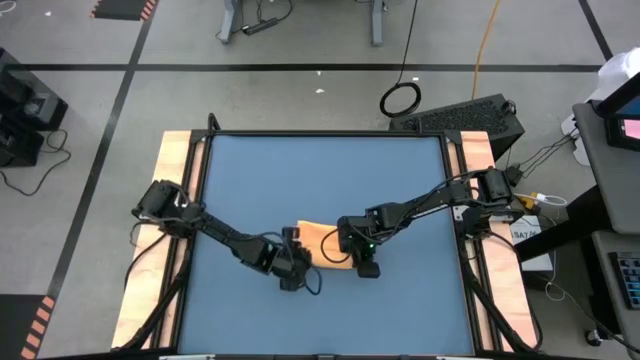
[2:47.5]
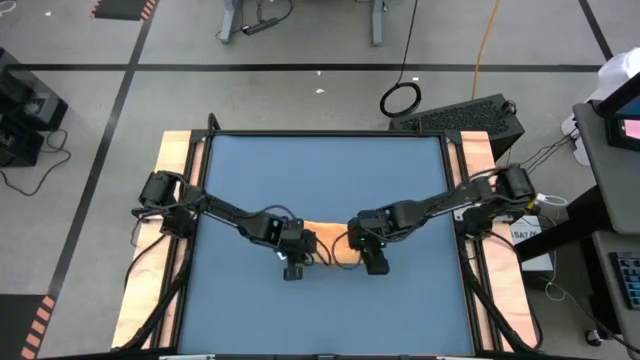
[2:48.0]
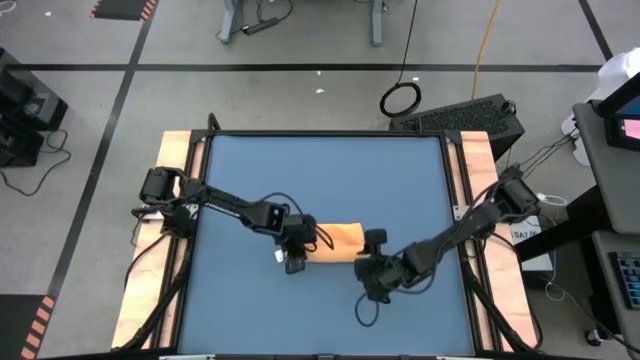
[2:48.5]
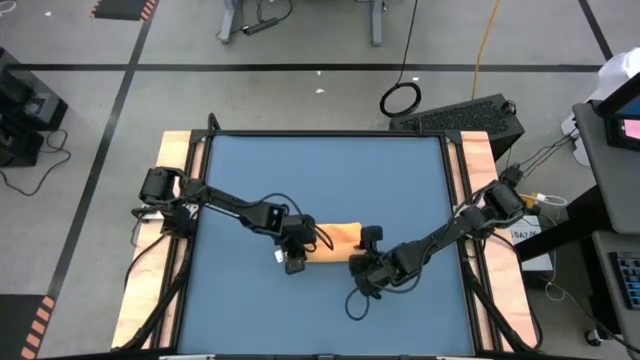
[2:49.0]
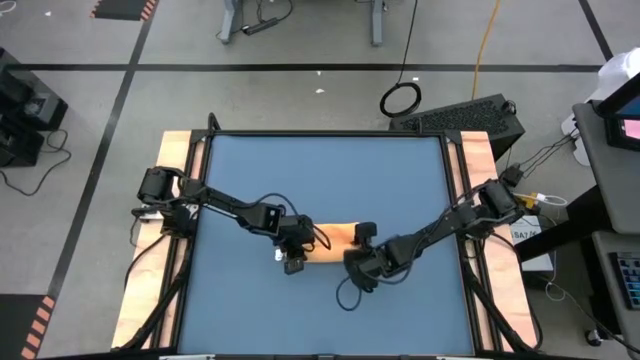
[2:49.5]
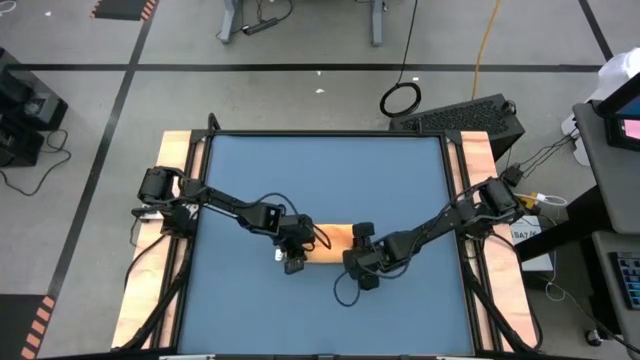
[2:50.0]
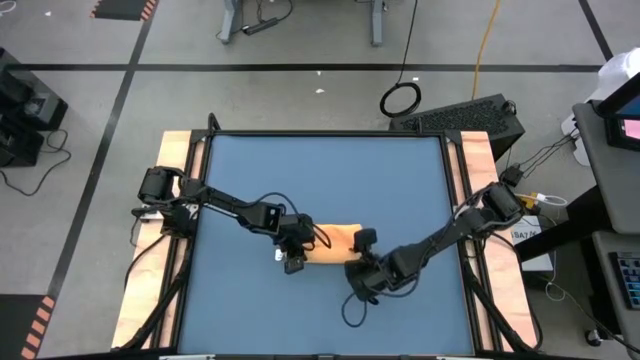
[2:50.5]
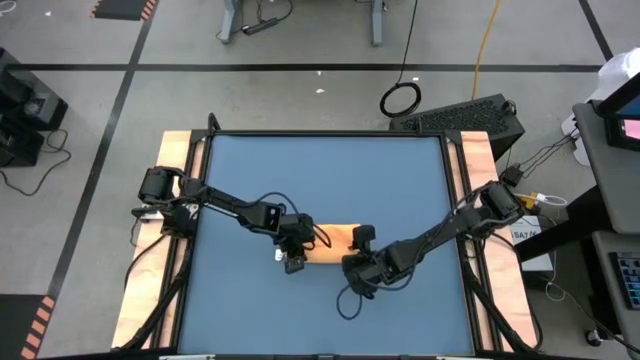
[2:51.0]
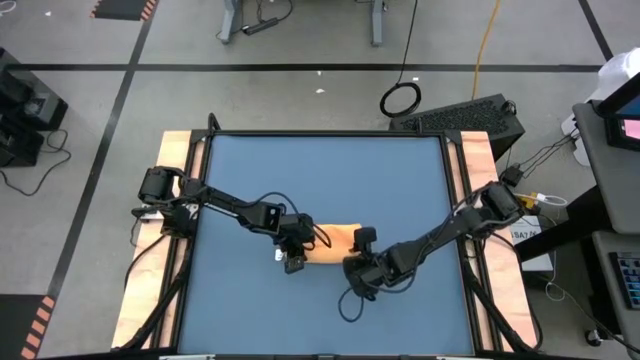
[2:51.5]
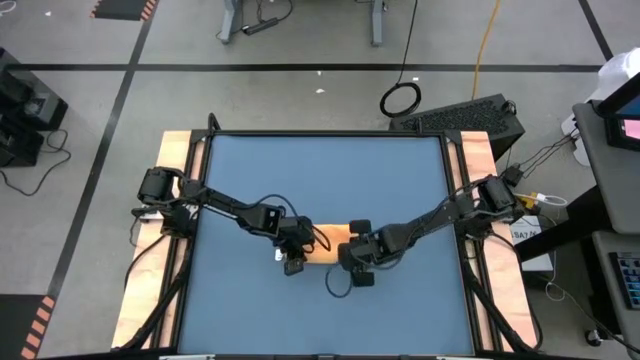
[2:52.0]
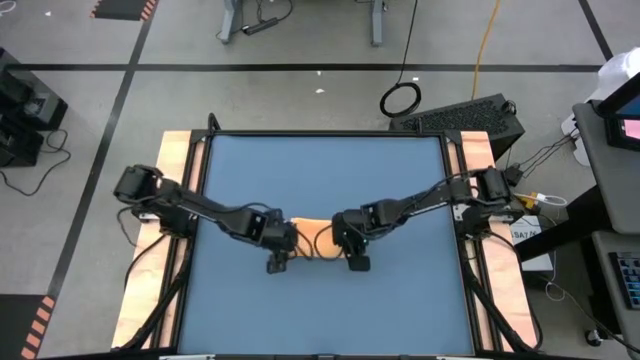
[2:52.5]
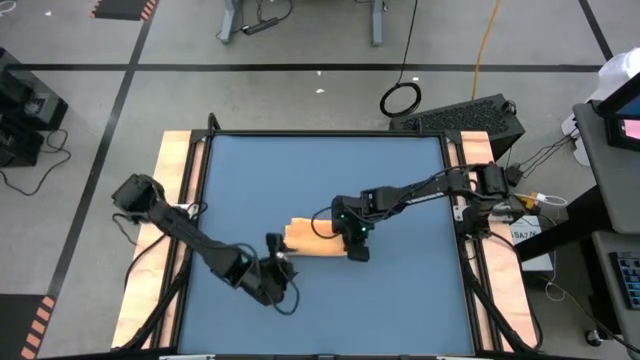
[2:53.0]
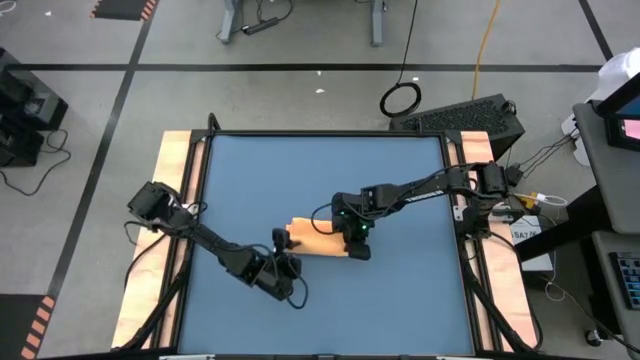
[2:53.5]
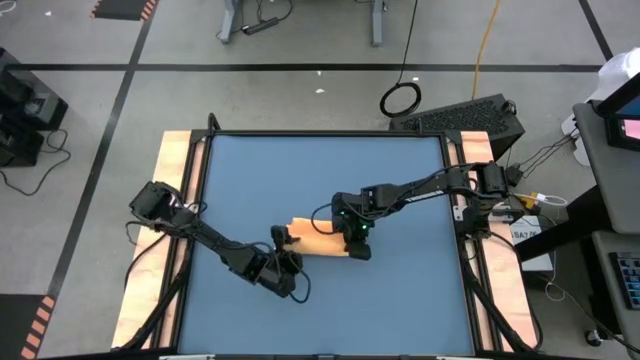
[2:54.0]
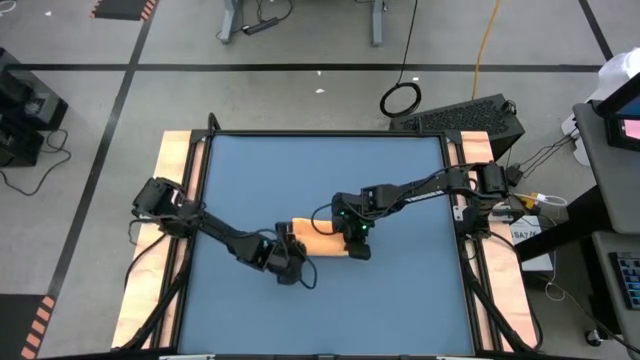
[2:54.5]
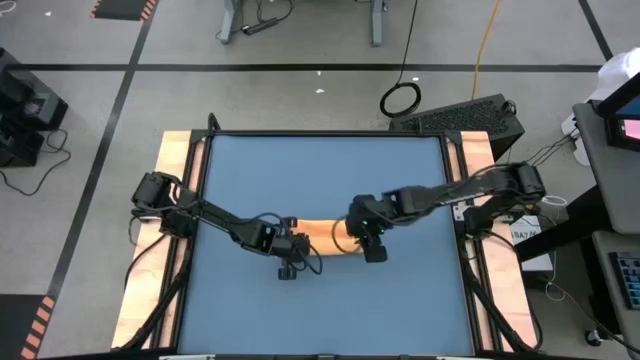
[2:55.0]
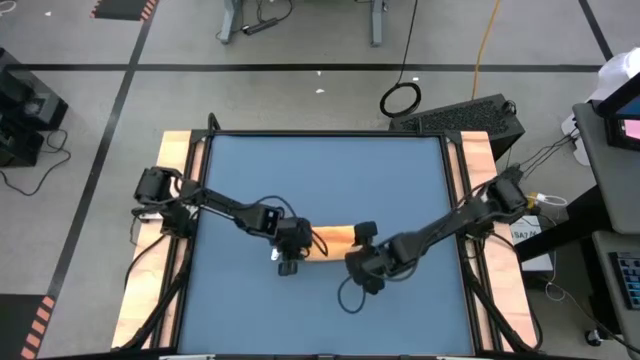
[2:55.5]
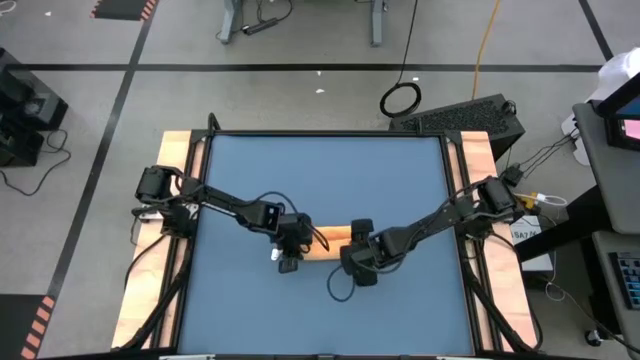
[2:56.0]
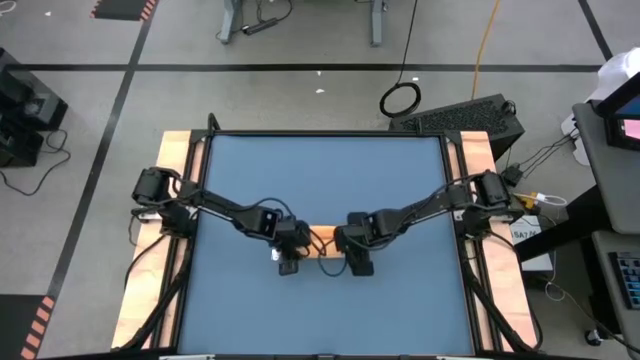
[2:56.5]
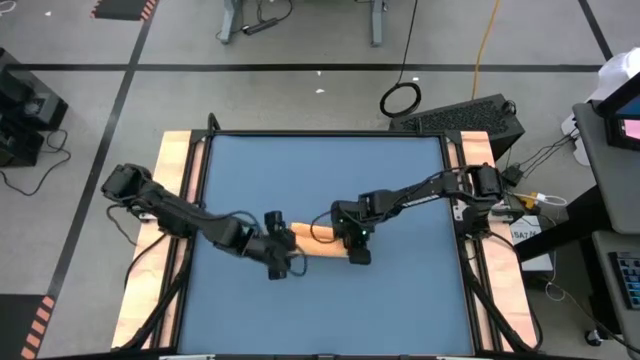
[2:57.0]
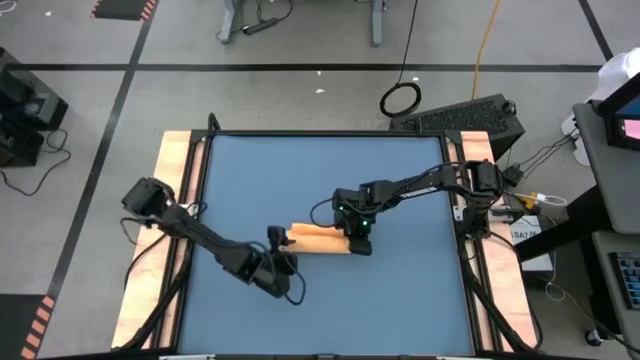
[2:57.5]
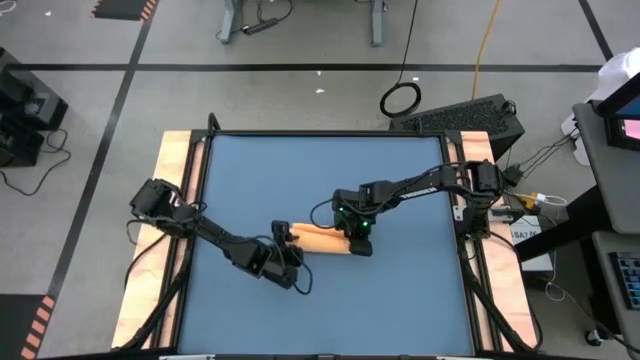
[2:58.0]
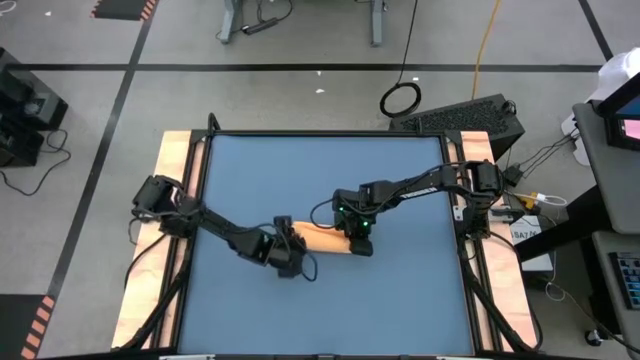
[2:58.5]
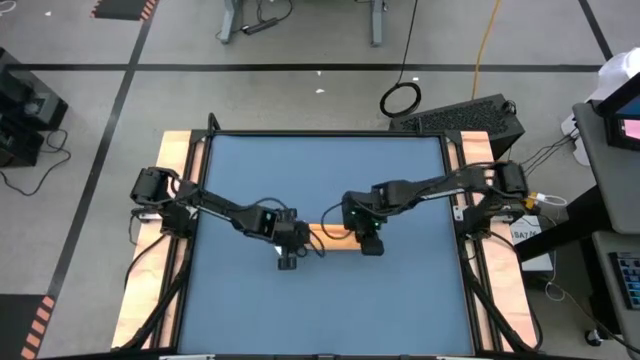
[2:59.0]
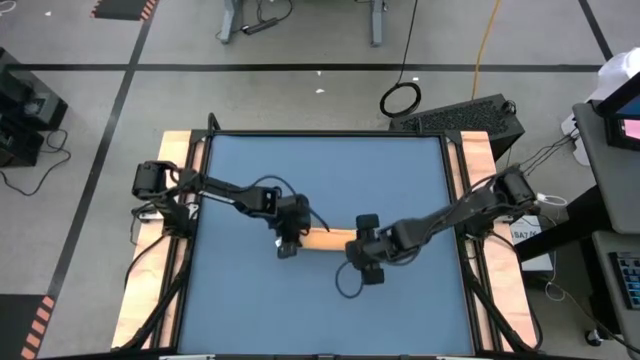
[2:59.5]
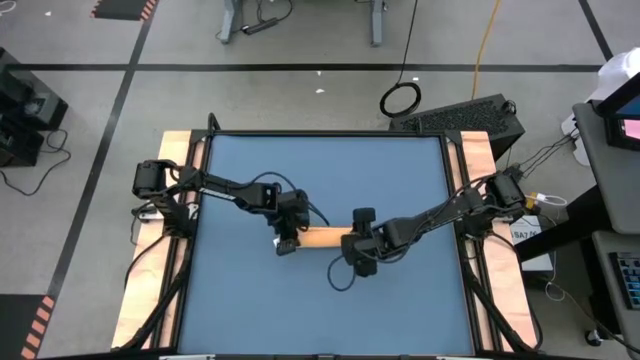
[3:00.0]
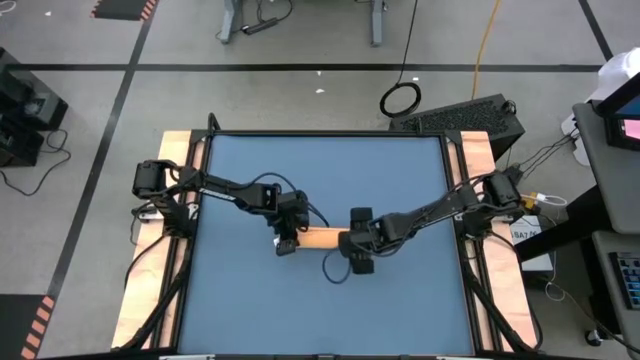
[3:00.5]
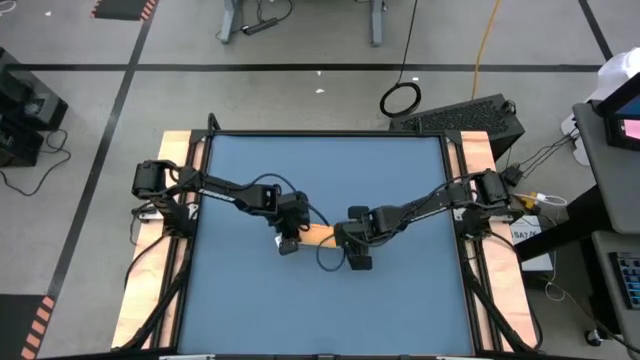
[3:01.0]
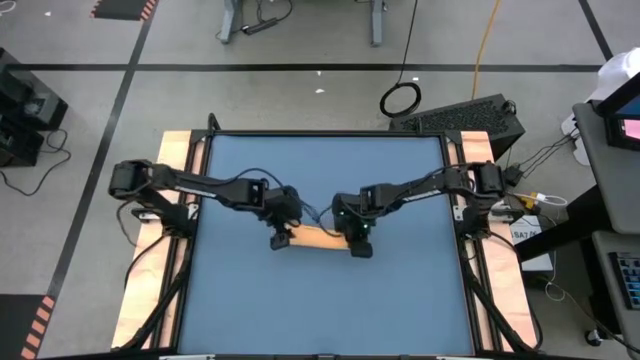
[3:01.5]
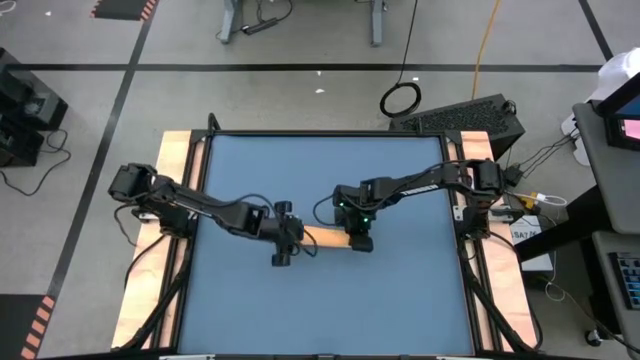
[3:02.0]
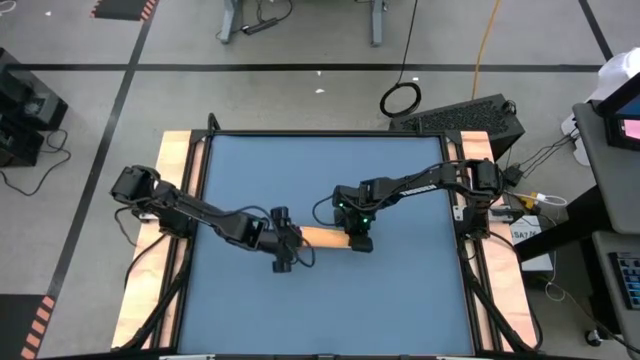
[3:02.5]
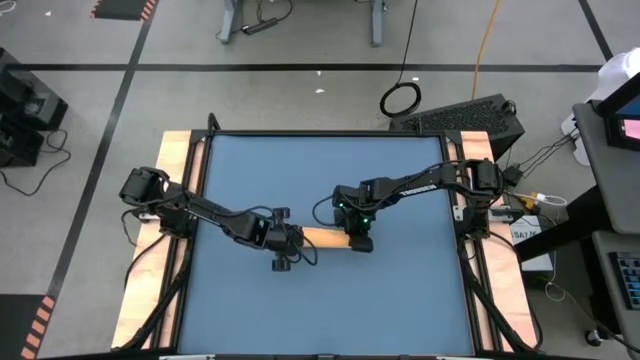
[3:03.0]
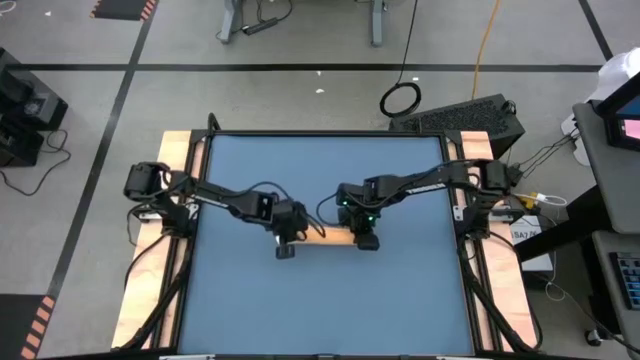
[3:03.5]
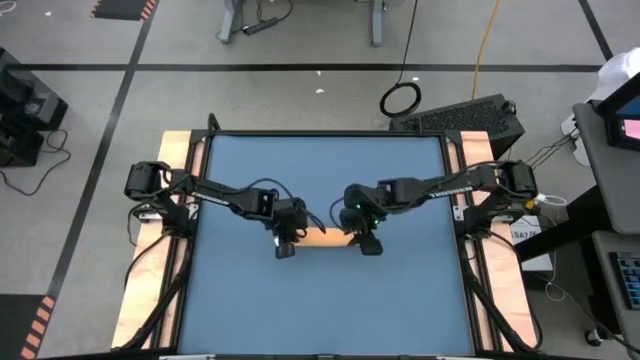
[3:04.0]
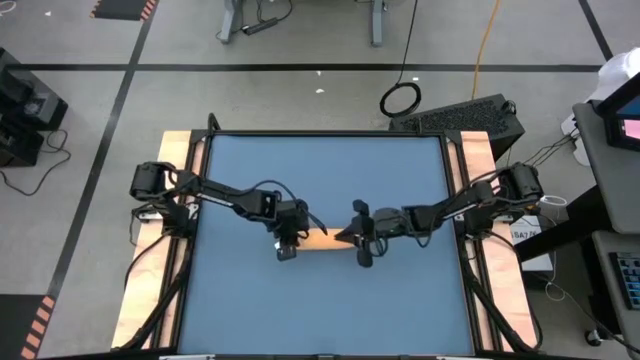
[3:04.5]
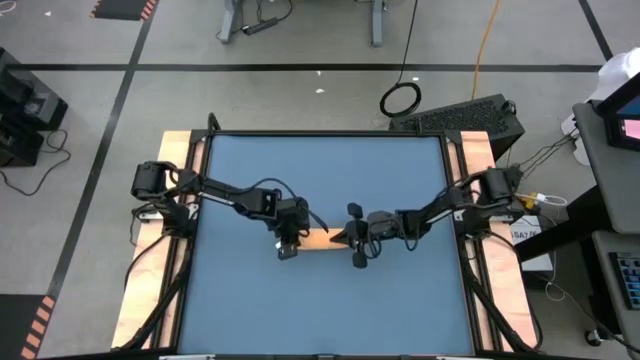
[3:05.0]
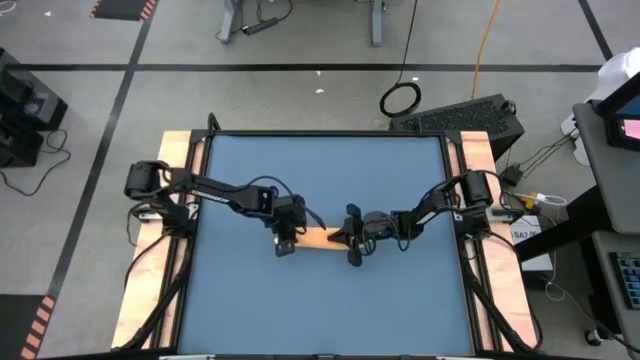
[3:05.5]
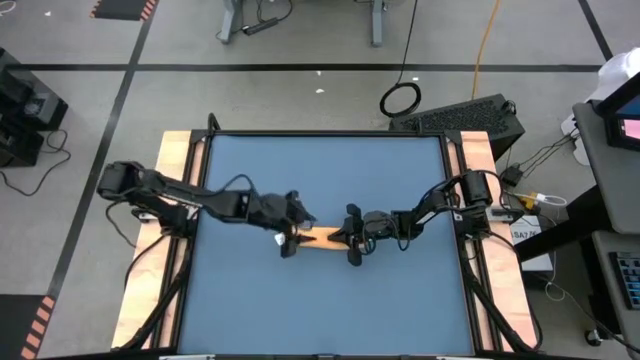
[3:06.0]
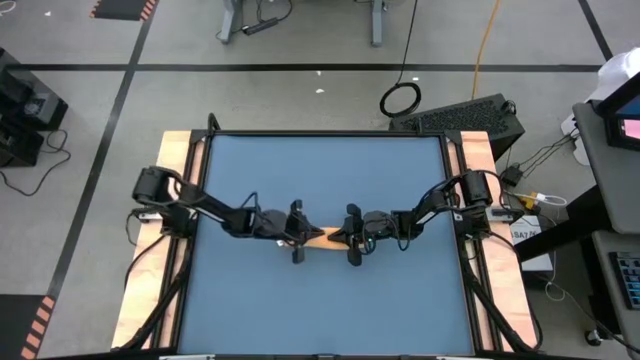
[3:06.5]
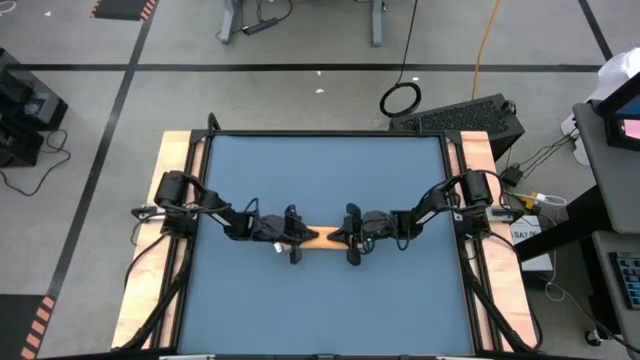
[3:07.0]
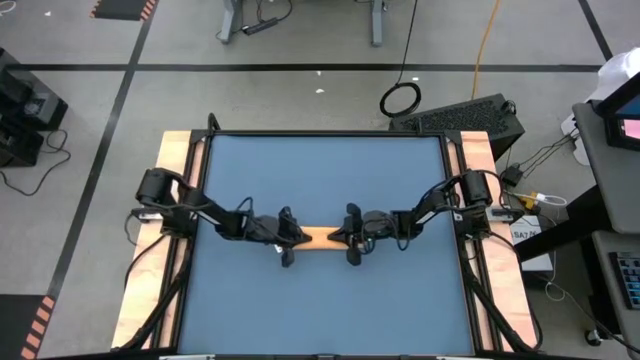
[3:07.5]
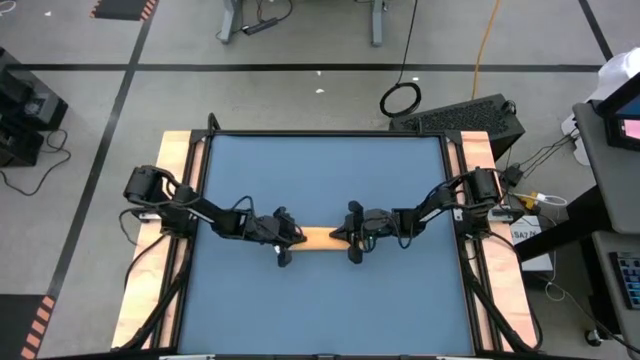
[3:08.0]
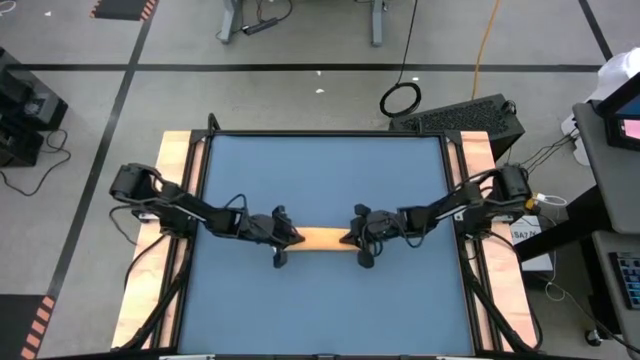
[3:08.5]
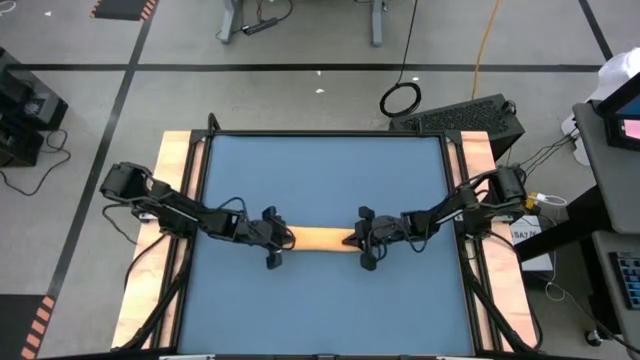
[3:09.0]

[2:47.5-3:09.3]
Task: Roll towel
Roll the yellow towel
